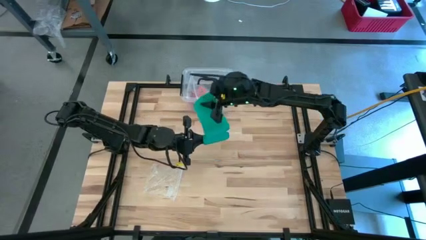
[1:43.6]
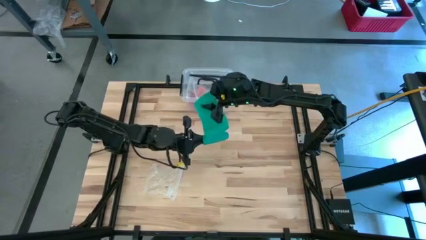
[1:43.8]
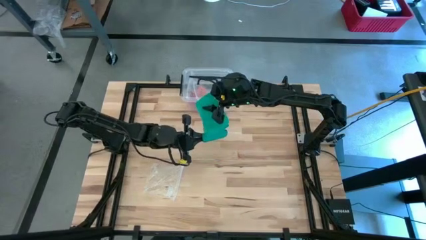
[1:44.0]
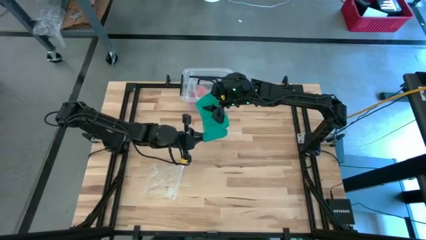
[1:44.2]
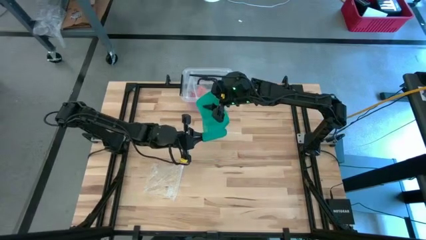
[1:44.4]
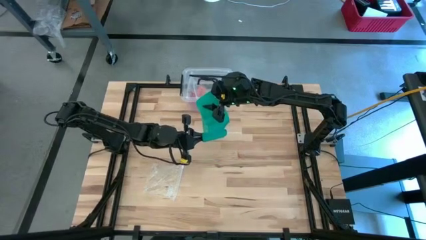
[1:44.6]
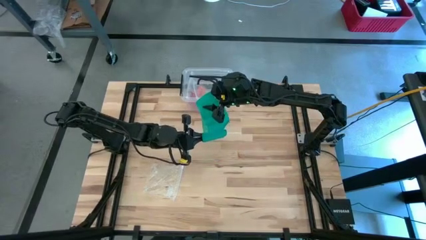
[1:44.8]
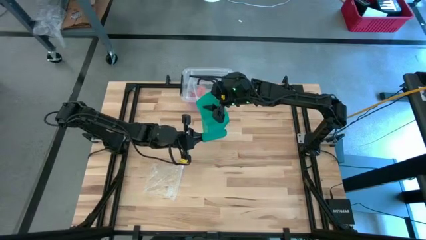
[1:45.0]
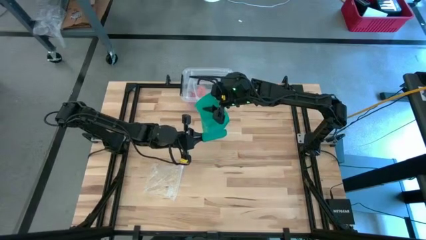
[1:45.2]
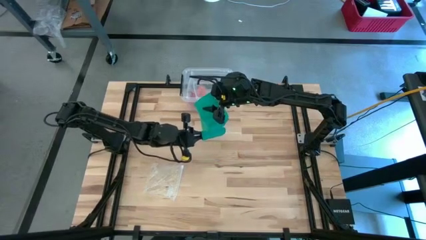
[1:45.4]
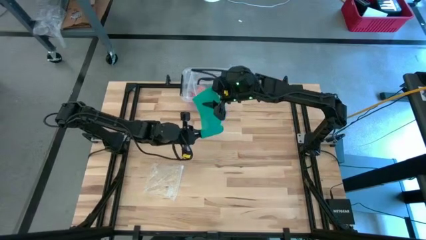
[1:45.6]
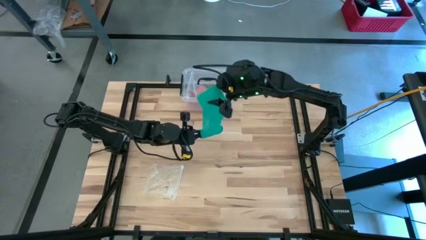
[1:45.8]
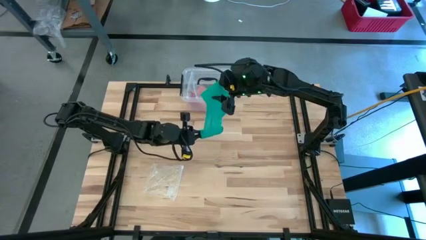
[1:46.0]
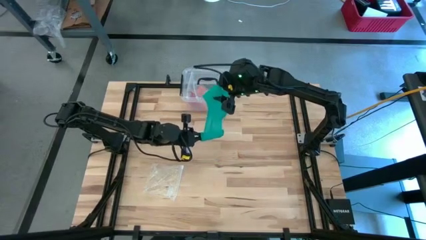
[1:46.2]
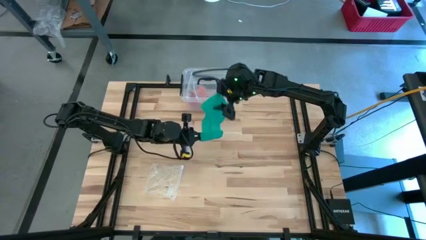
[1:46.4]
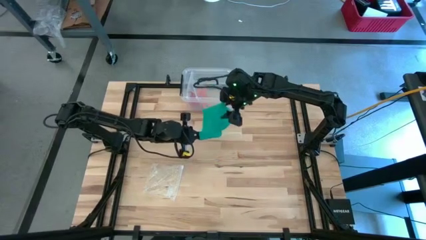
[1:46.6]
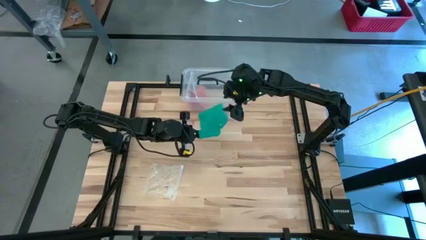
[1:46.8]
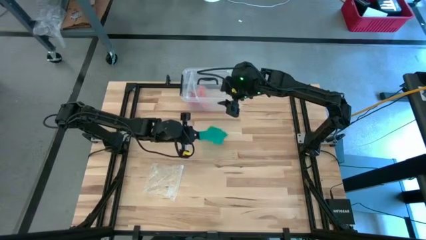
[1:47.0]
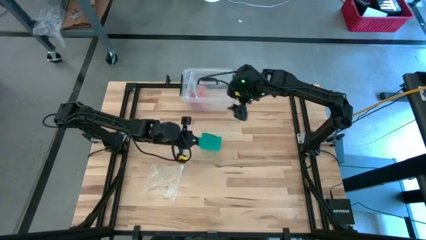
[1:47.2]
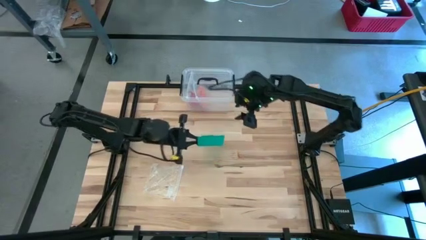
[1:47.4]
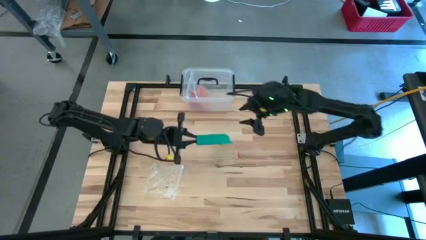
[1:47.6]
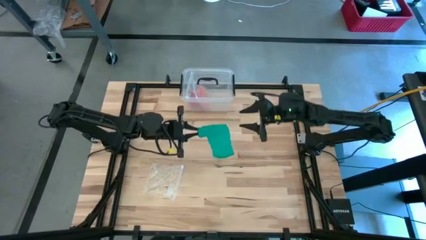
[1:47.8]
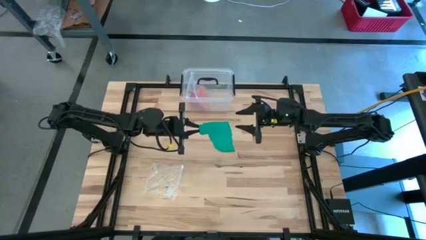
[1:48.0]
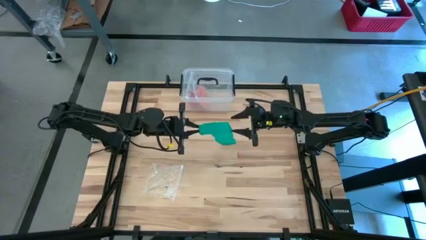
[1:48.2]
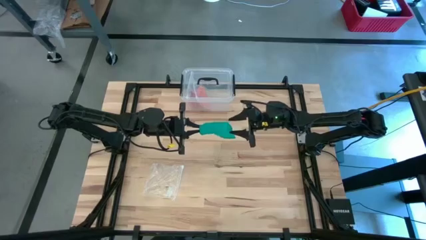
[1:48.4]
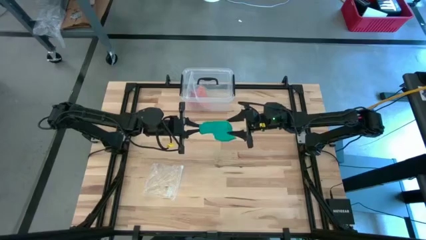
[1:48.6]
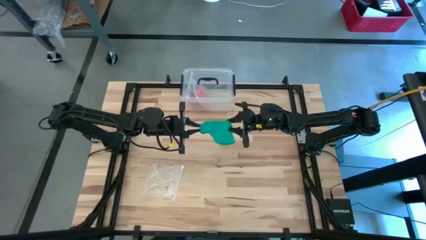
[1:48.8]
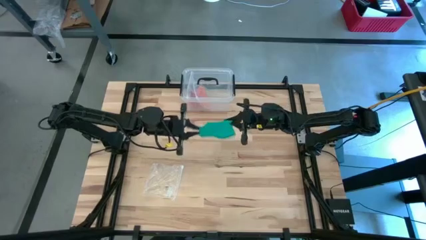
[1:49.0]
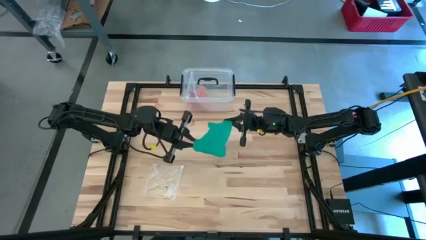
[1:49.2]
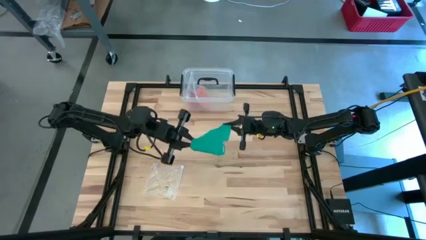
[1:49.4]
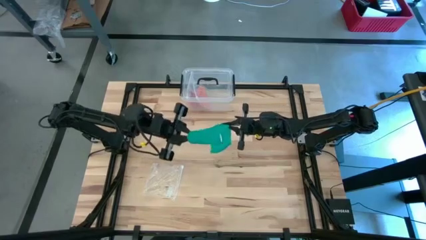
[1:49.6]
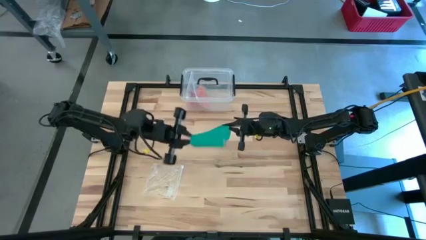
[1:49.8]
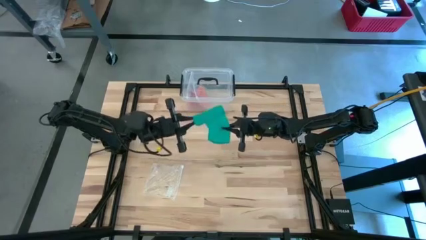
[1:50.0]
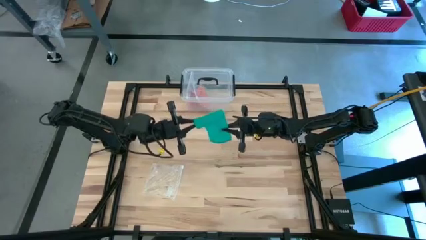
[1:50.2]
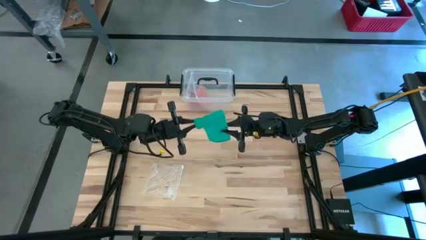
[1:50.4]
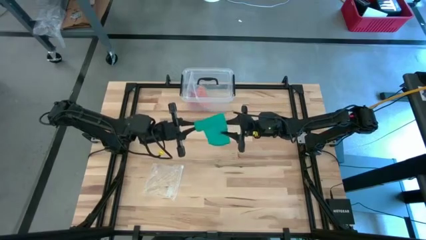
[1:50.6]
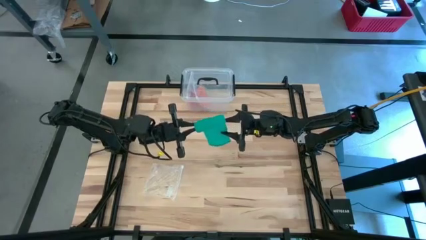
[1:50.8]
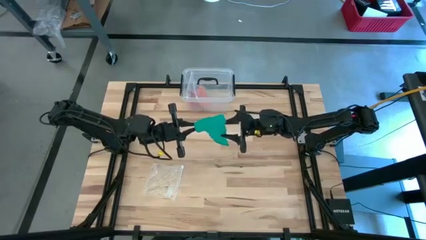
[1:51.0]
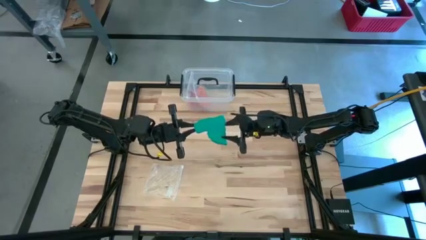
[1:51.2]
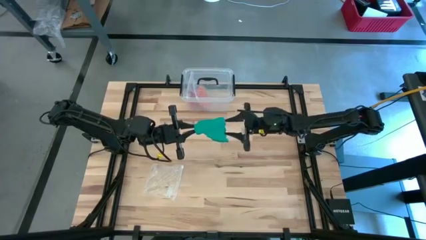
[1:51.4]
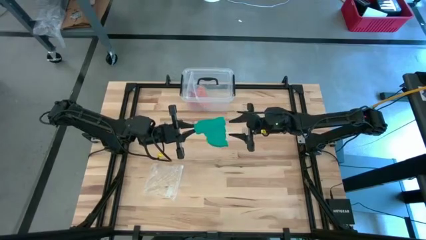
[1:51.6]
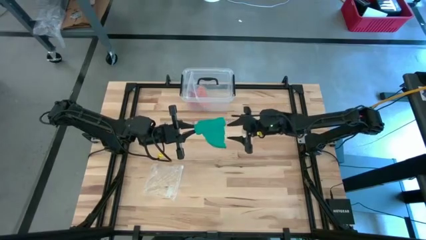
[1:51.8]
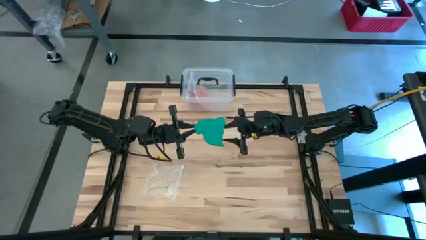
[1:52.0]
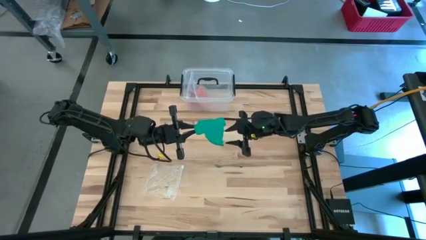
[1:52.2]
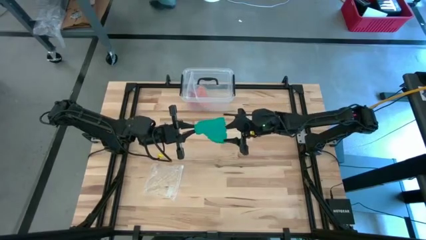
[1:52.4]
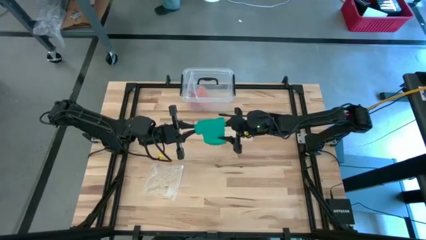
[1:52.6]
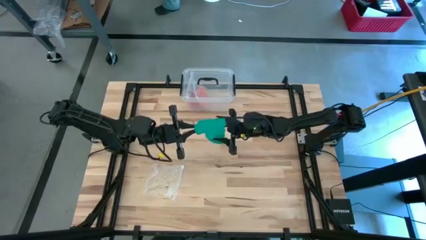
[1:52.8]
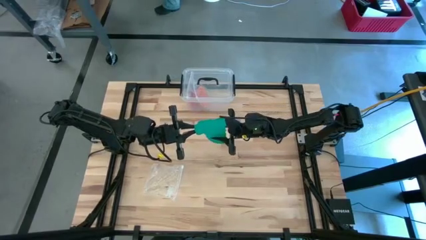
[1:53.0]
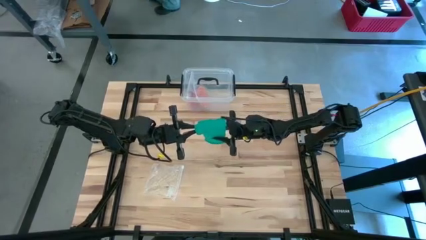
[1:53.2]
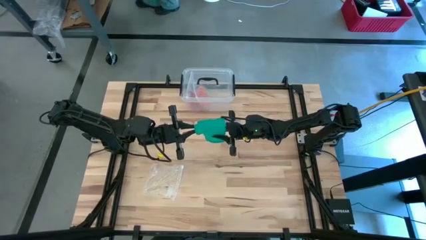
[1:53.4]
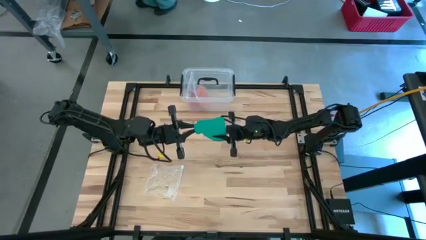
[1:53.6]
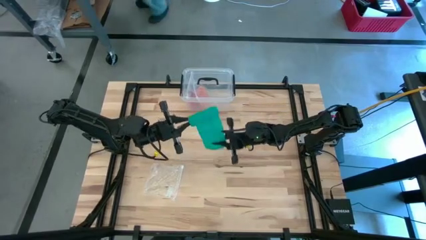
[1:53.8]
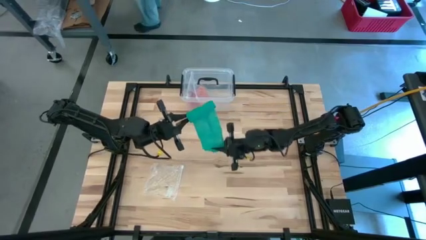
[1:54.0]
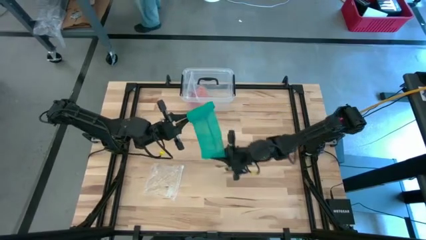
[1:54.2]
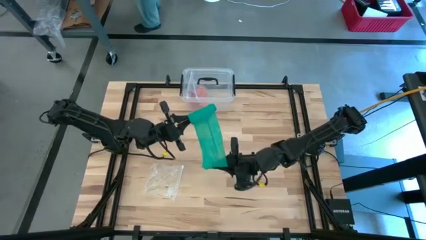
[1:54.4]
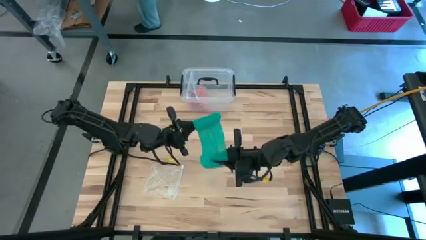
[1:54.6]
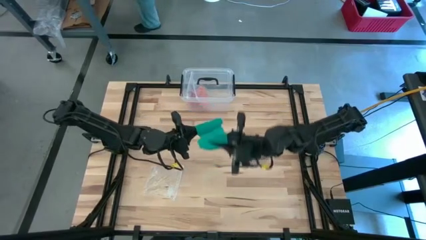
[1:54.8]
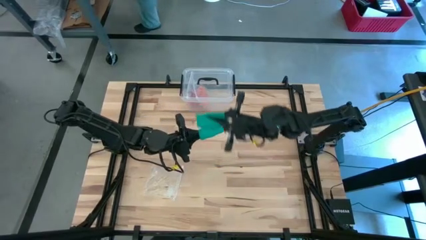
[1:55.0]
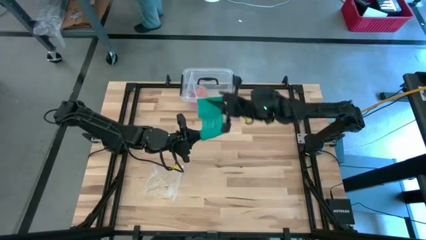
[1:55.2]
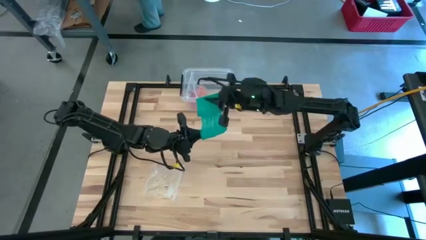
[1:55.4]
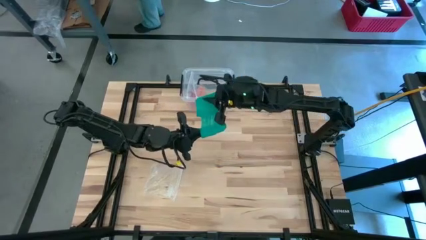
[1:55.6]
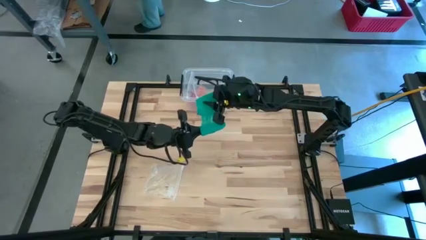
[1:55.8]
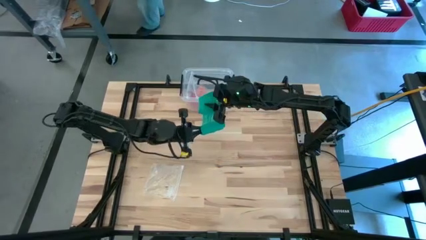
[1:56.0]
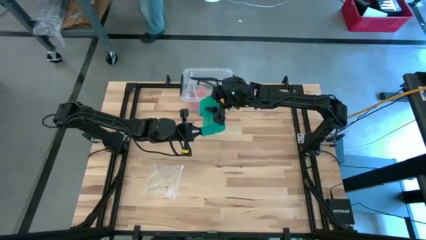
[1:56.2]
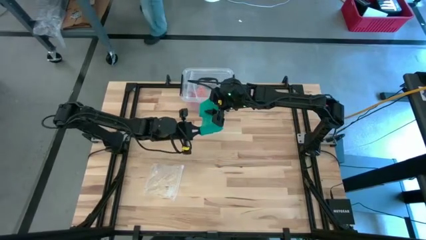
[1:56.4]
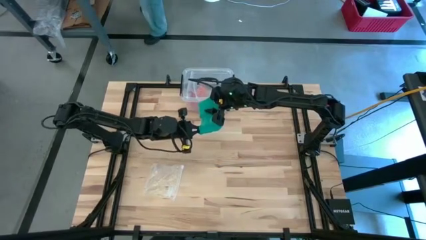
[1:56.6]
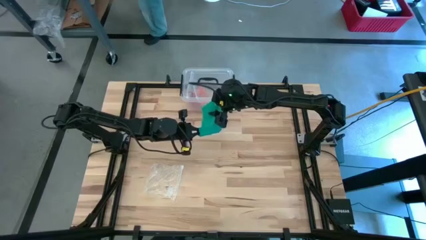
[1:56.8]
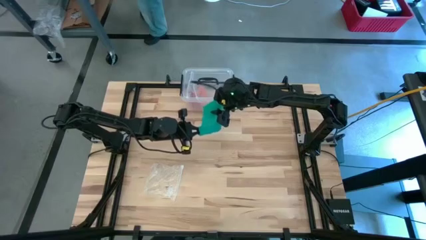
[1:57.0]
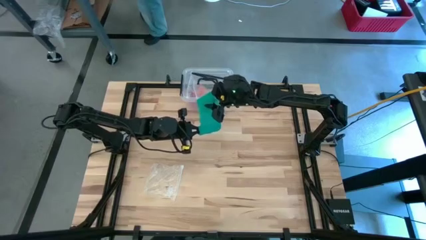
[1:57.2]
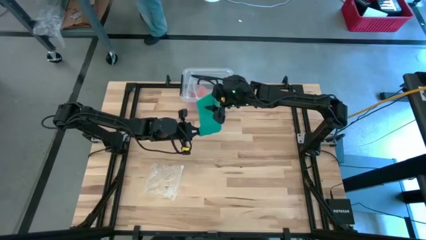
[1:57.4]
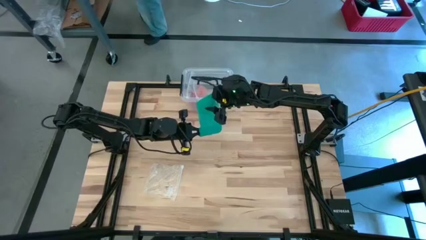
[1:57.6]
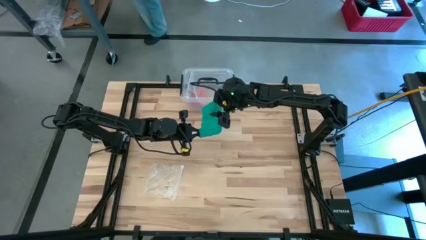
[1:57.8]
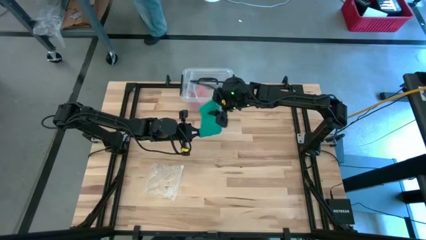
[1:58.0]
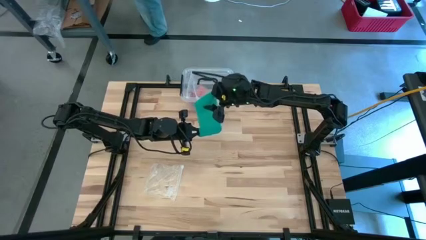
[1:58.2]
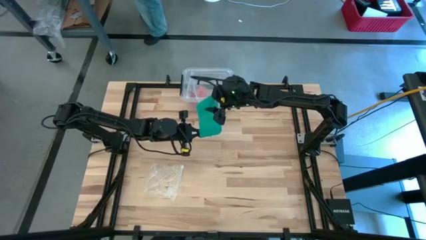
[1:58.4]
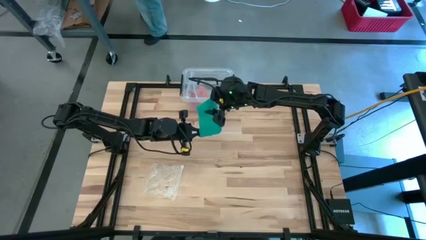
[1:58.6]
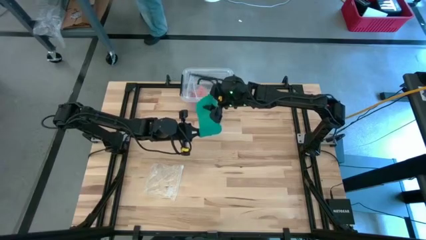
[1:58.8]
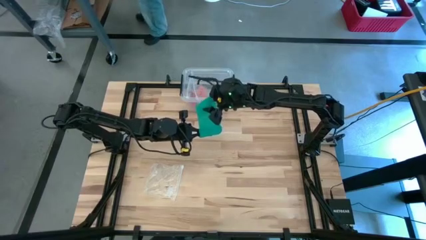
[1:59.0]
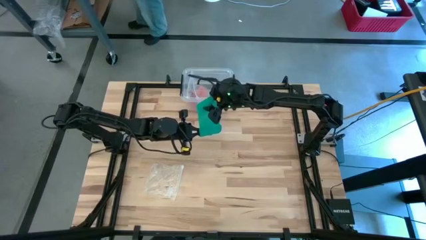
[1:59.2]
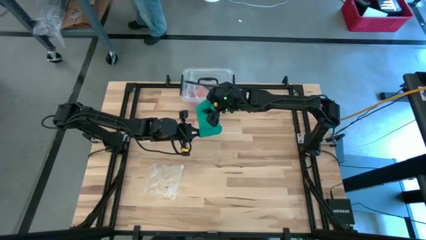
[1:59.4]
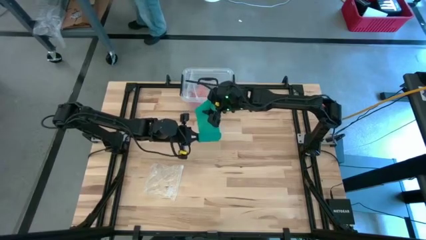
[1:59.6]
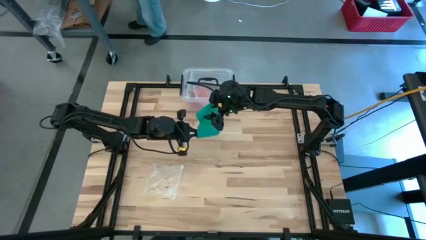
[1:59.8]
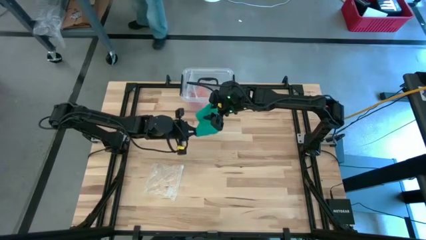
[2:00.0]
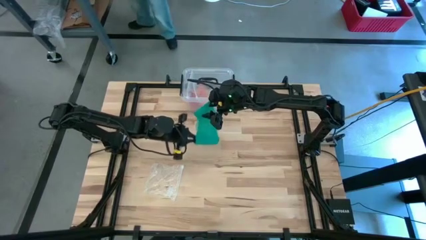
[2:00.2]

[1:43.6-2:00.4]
Task: Roll bandage
Roll the green bandage
